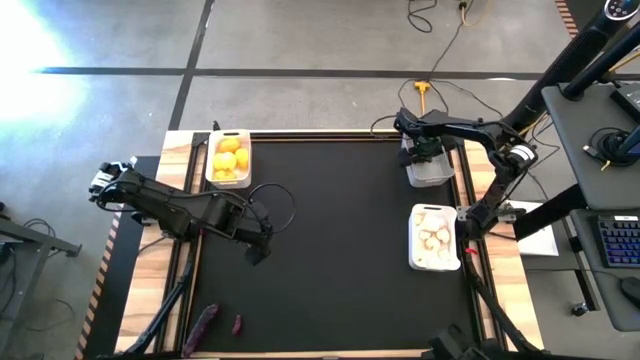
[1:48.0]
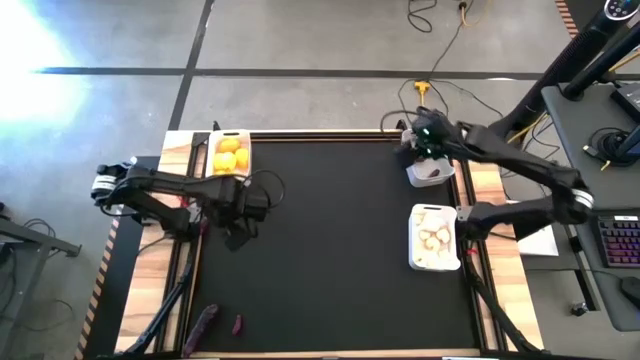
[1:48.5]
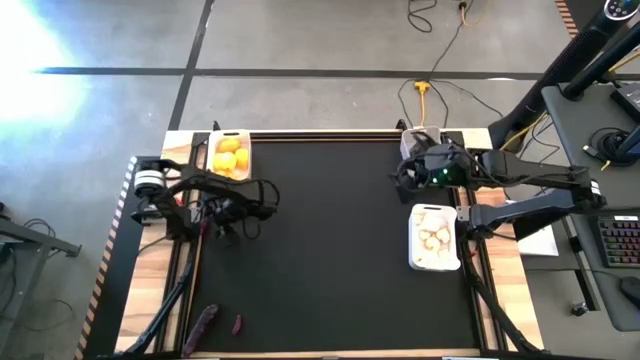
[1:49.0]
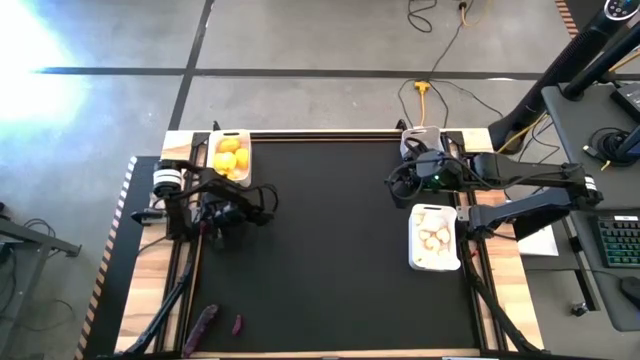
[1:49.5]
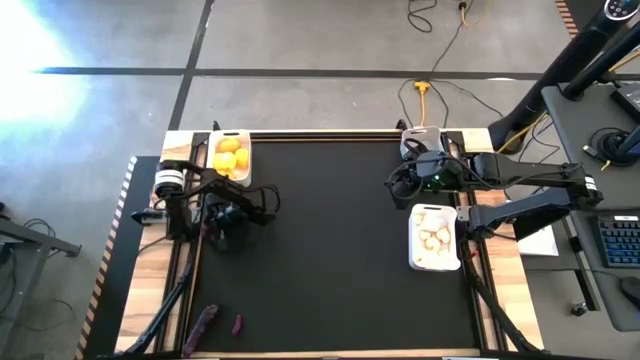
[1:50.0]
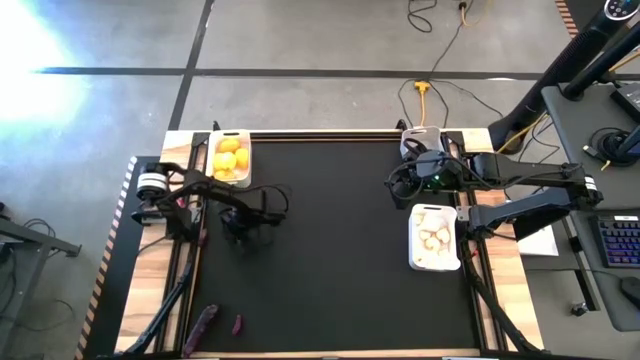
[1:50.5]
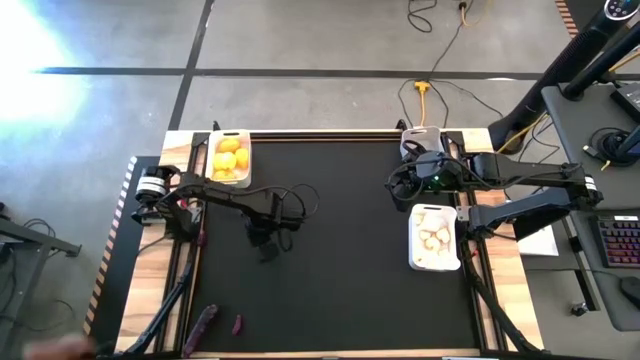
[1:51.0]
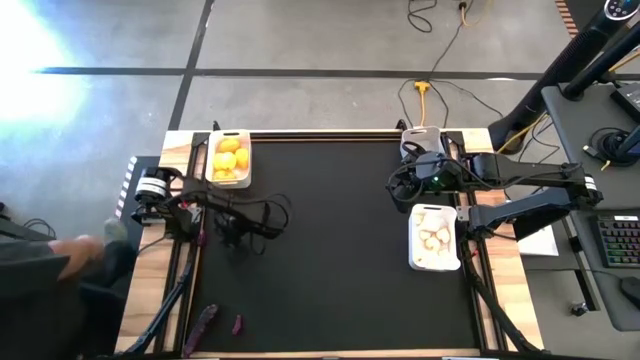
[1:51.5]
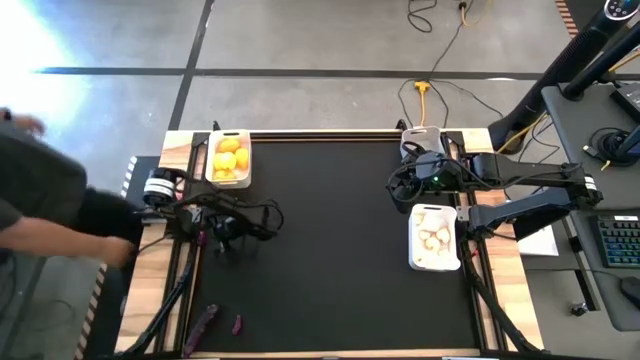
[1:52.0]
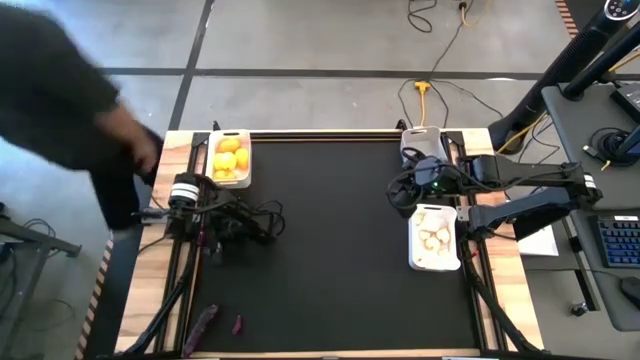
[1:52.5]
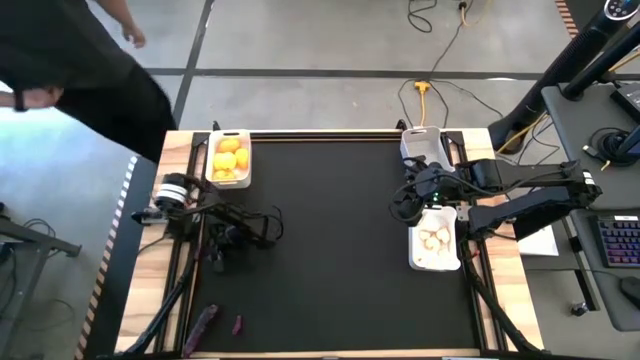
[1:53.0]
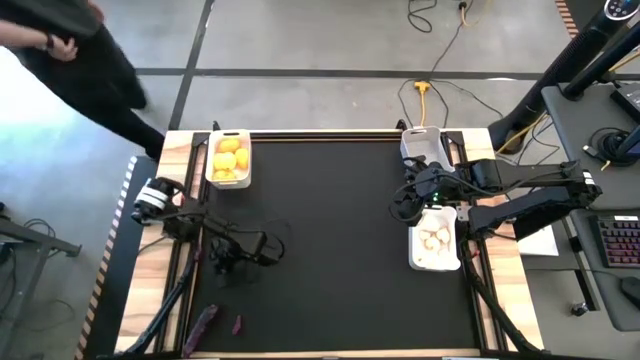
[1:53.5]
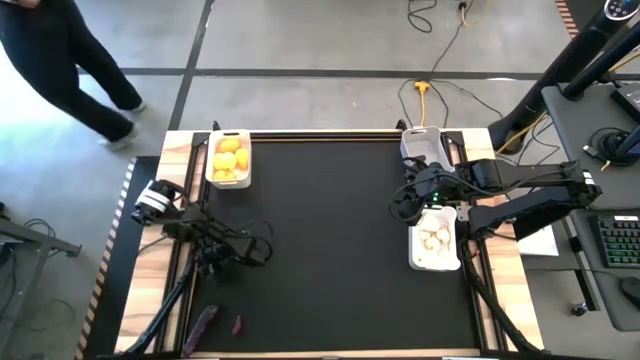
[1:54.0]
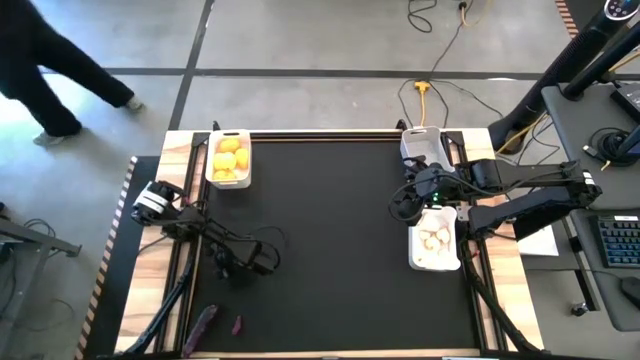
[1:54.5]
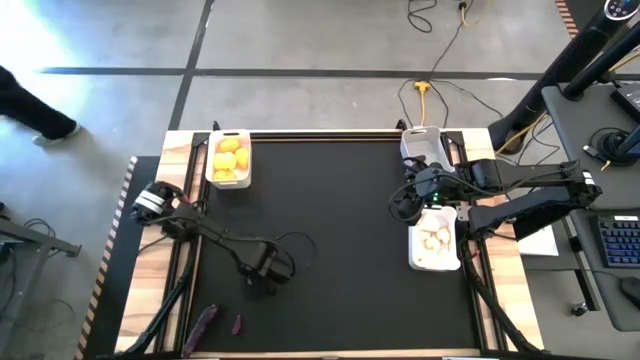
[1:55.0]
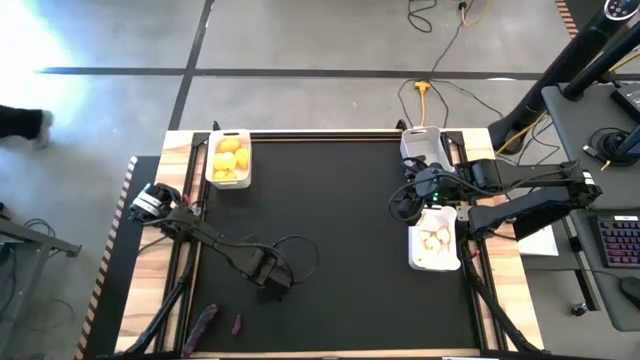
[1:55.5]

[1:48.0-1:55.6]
Task: Sort produce into baskets
Put the purple eggplant into the gray bin

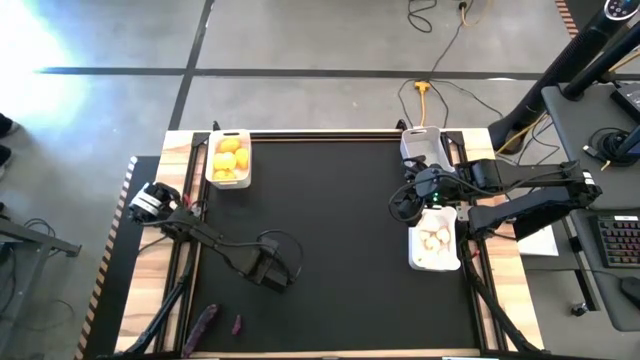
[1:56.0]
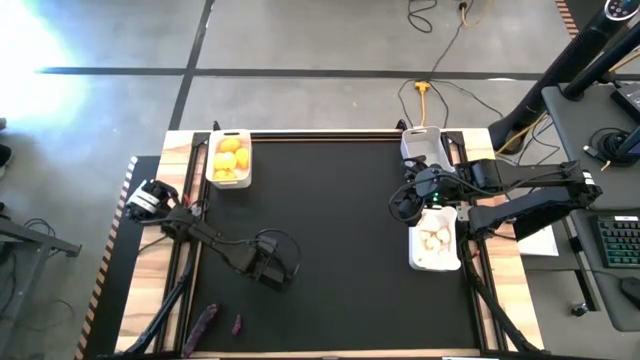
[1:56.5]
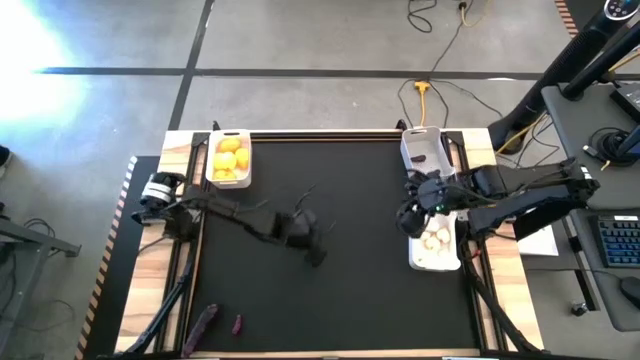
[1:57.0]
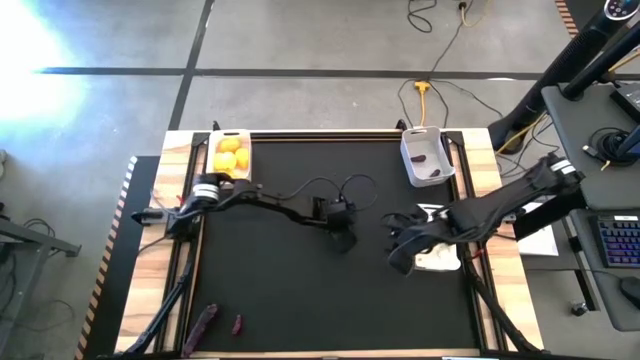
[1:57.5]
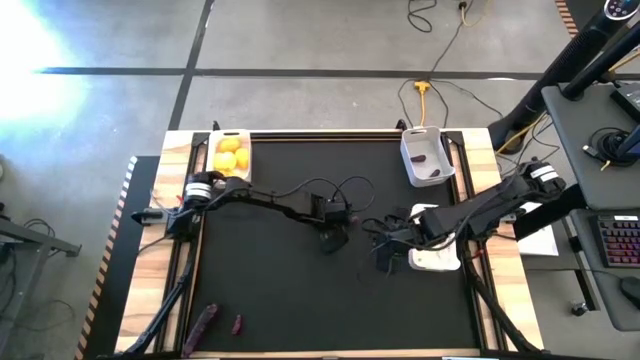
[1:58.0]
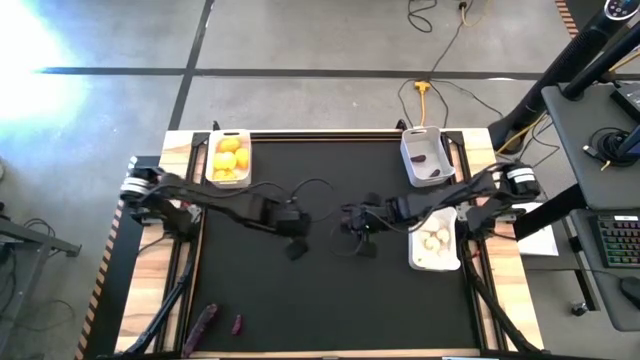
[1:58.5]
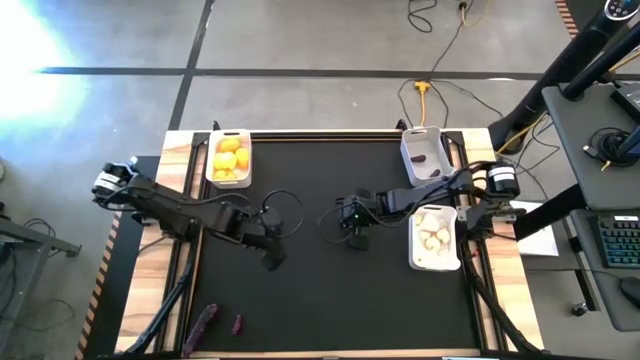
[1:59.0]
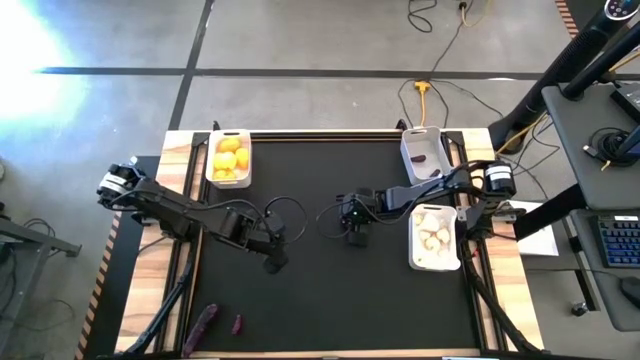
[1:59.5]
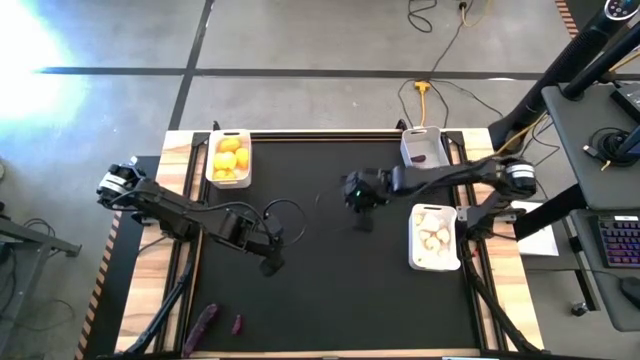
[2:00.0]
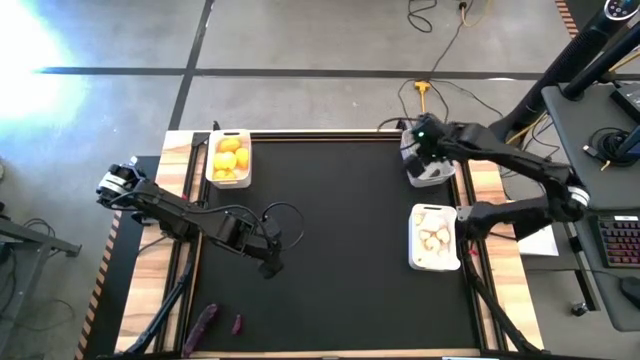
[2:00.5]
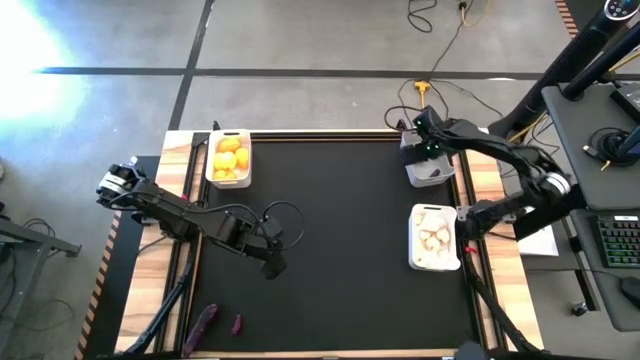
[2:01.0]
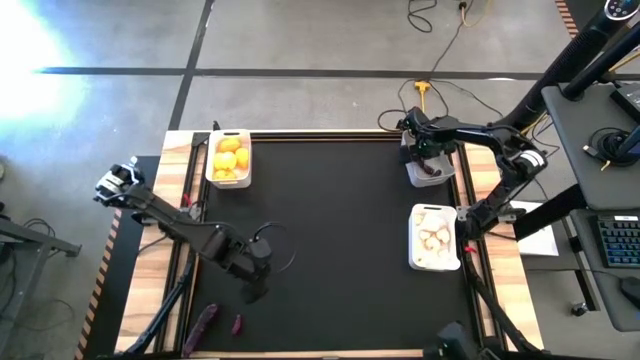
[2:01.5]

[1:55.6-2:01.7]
Put the purple eggplant into the gray bin

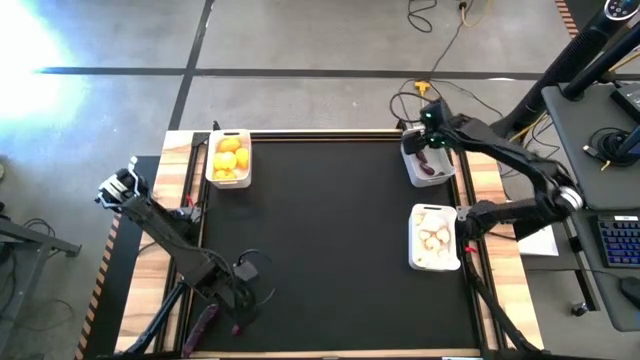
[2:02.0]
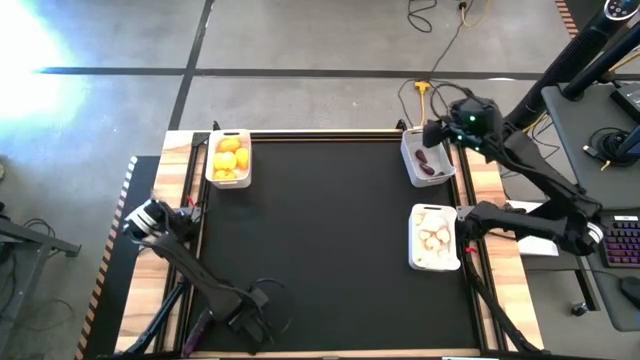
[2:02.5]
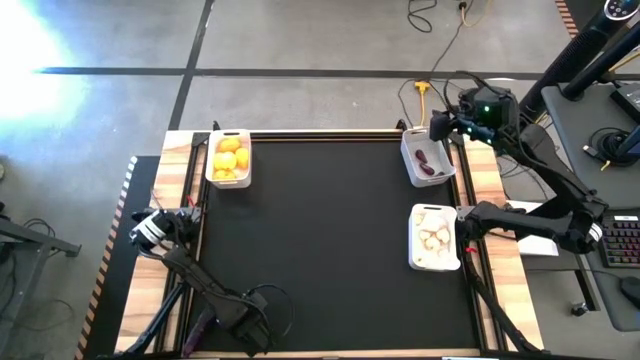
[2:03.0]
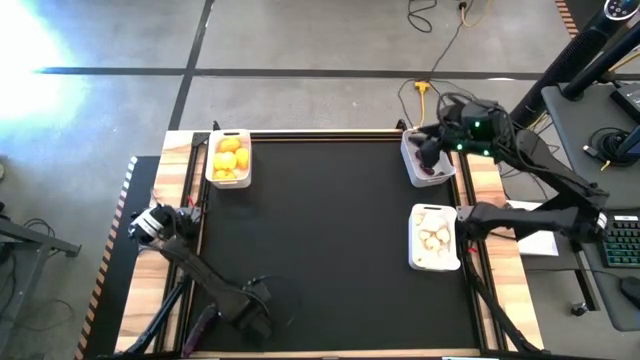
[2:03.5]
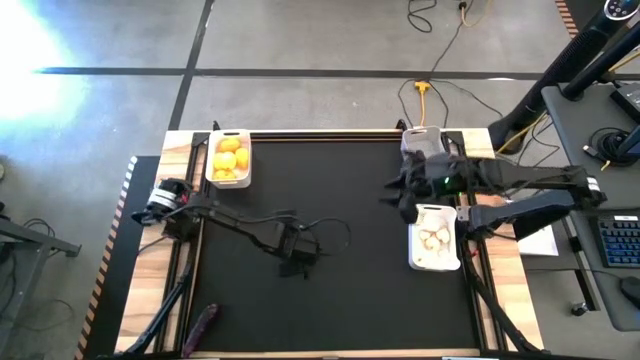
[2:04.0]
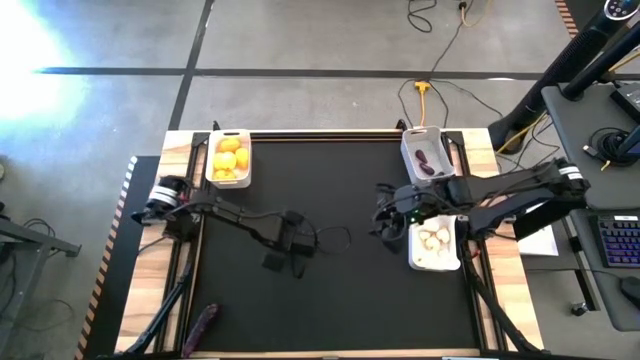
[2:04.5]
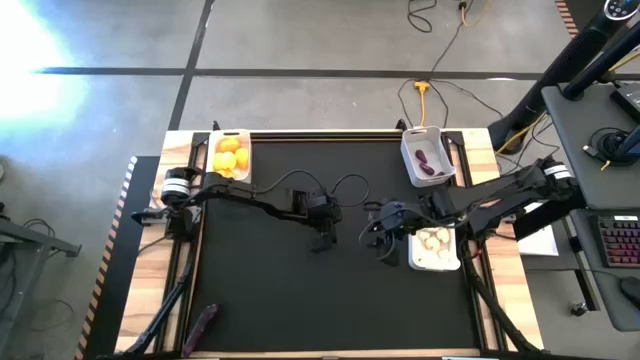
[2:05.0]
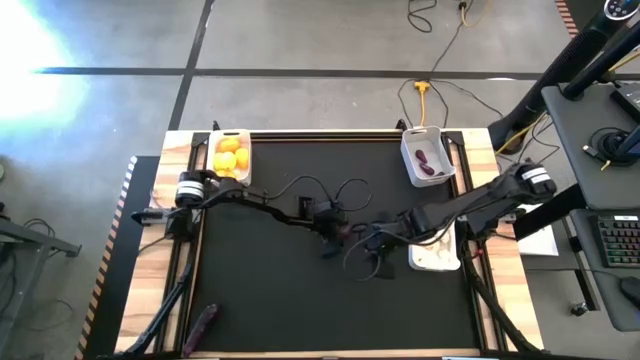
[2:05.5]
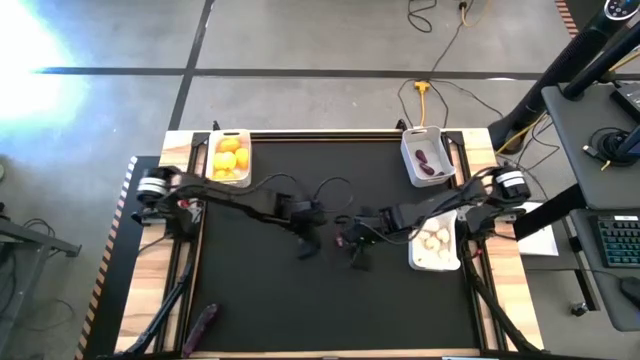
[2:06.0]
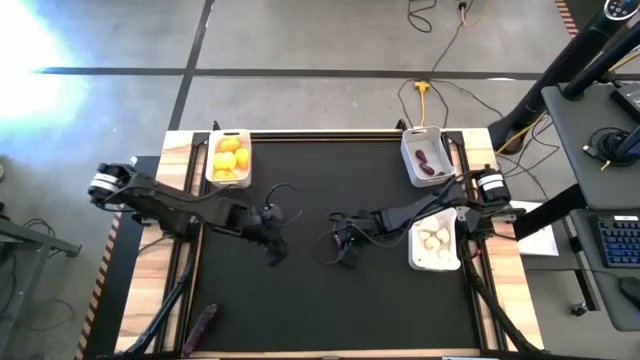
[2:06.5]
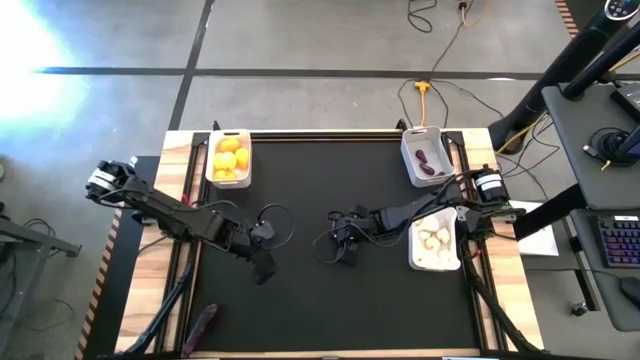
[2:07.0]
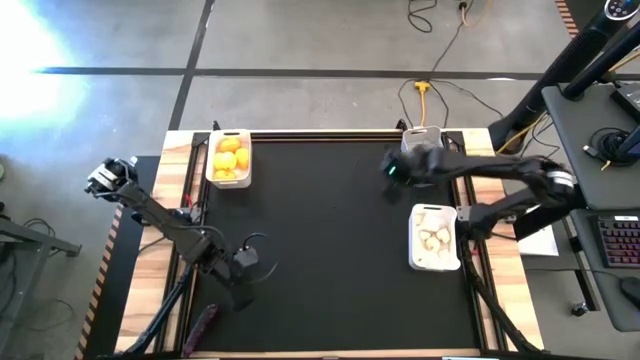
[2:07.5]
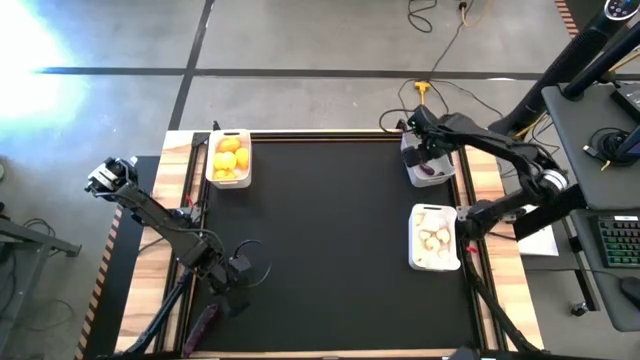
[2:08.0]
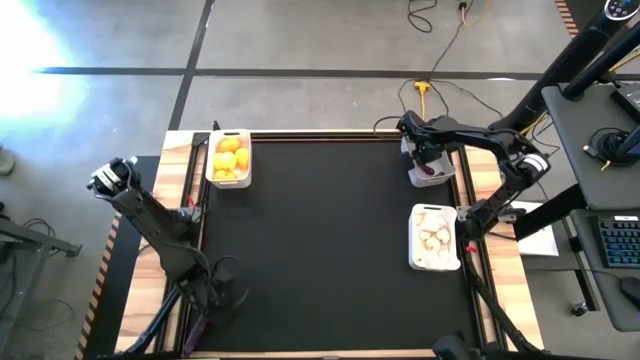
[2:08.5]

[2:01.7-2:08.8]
Put the purple eggplant into the gray bin

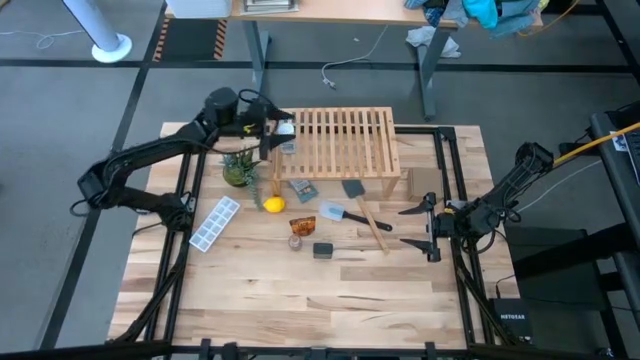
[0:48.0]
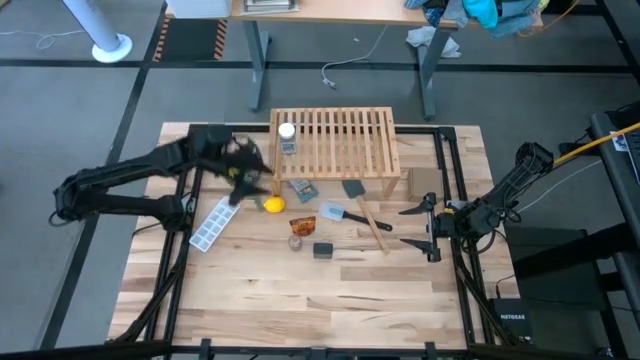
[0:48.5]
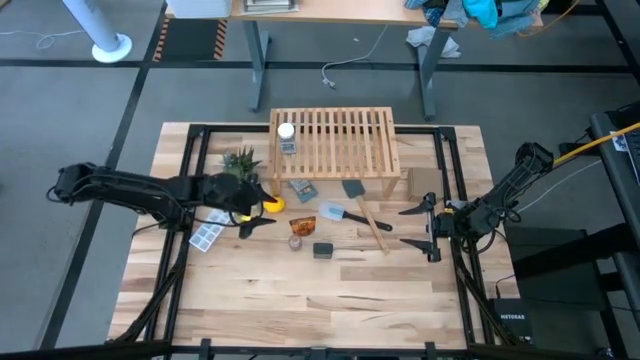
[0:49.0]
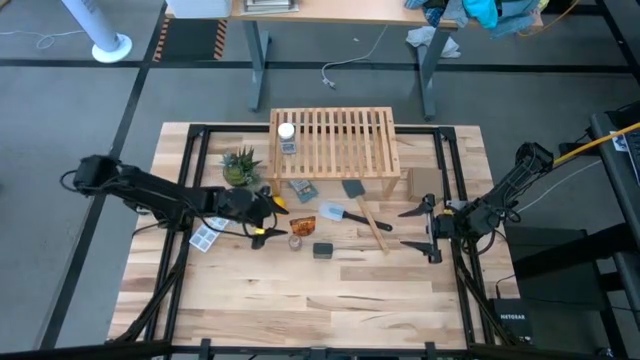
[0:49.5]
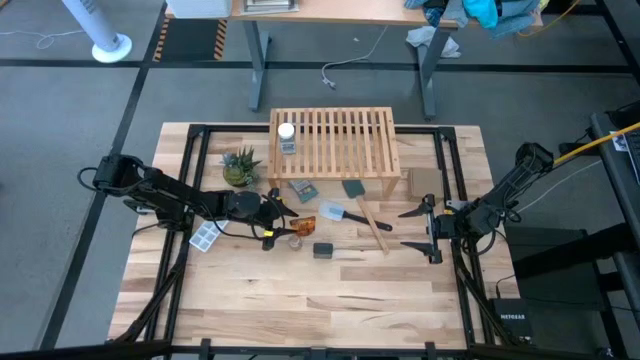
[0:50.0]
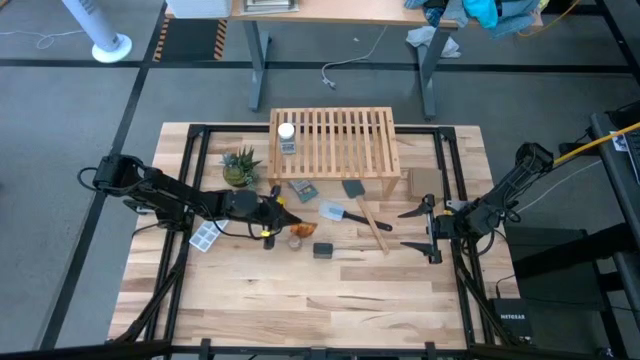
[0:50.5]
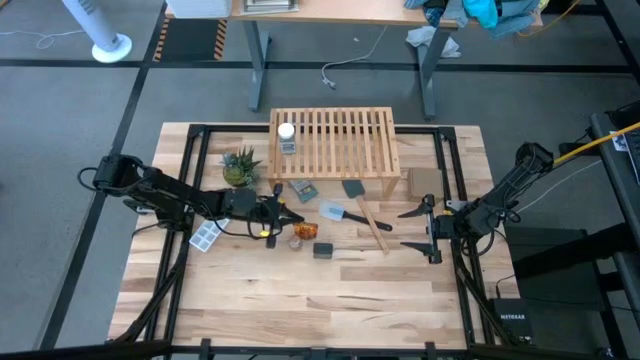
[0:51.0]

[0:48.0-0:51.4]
Task: Shelf spices
Put the orange seasoning bag on the shelf
